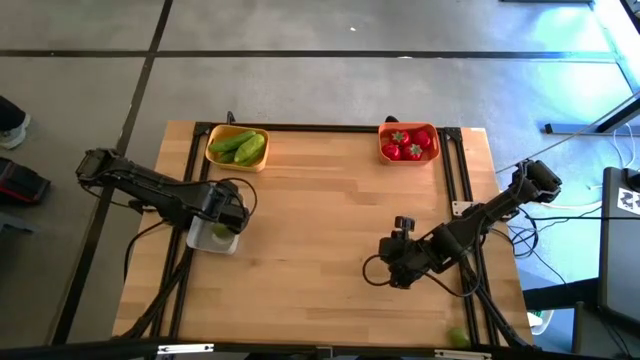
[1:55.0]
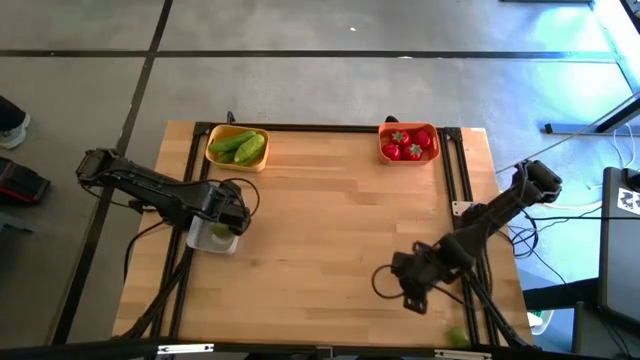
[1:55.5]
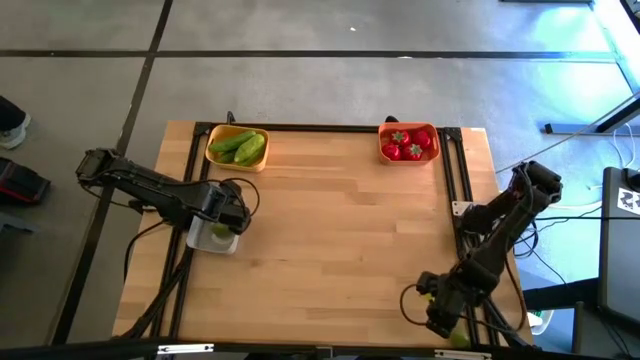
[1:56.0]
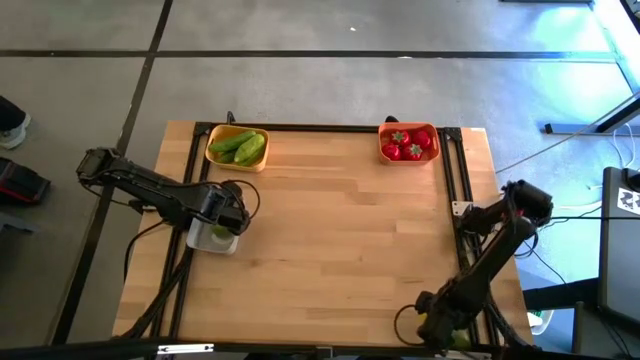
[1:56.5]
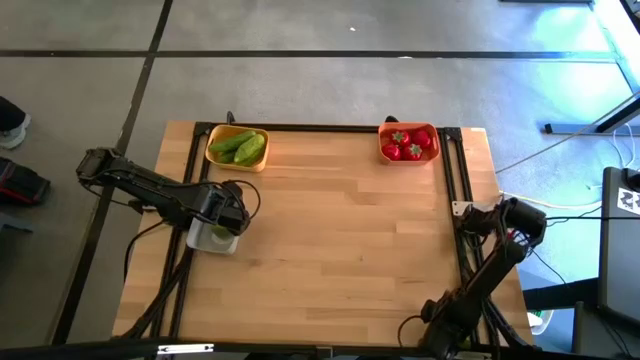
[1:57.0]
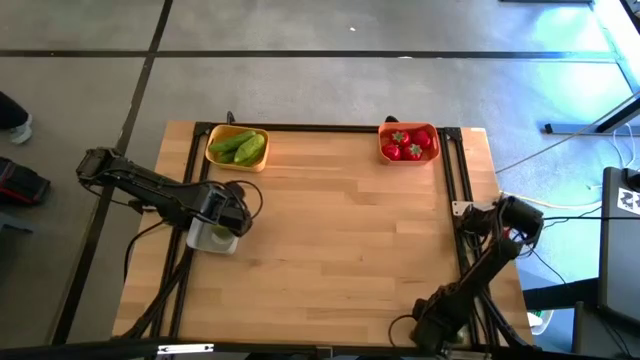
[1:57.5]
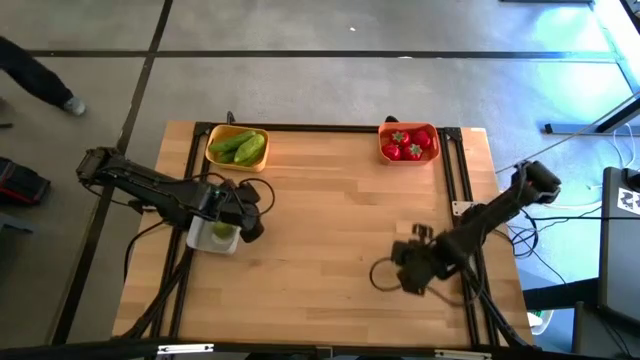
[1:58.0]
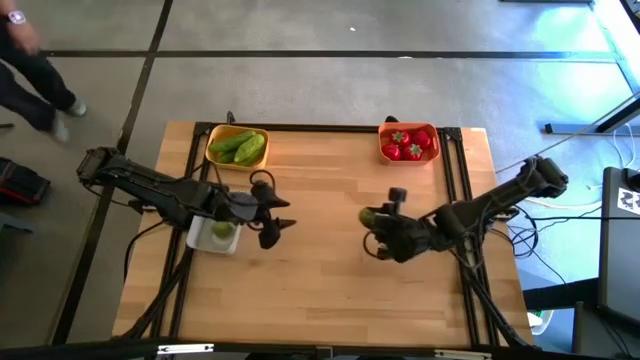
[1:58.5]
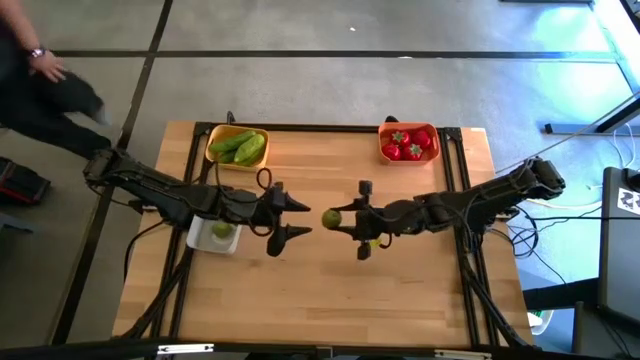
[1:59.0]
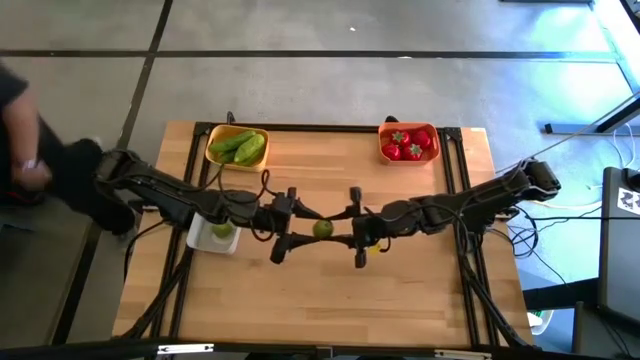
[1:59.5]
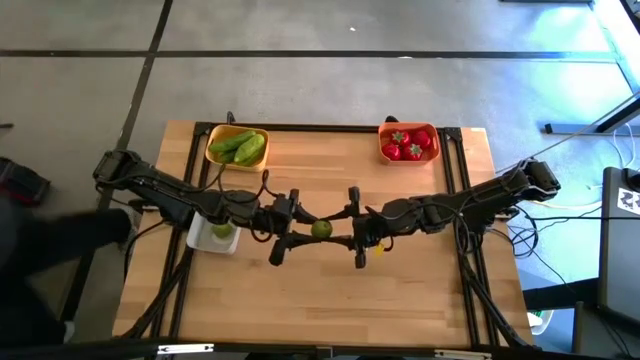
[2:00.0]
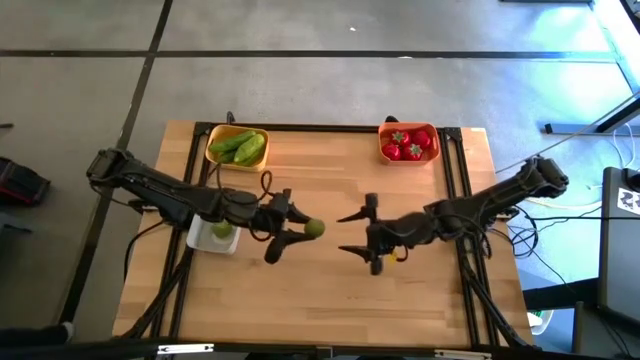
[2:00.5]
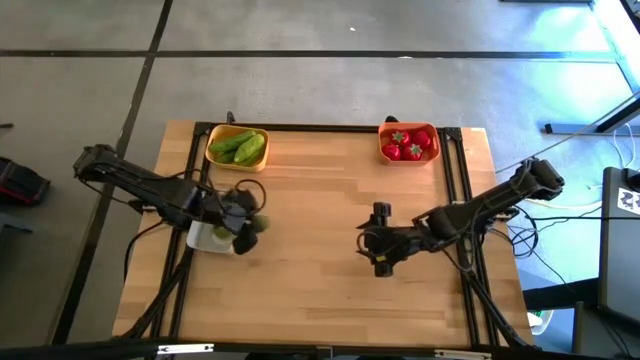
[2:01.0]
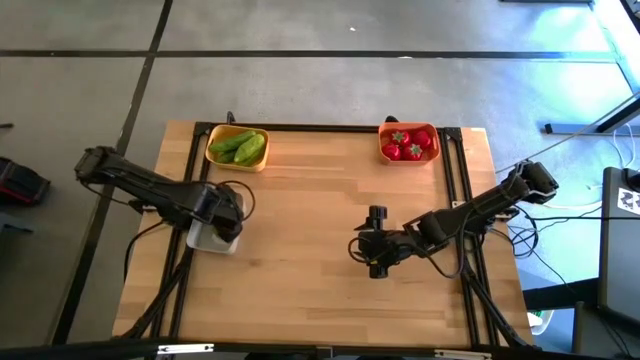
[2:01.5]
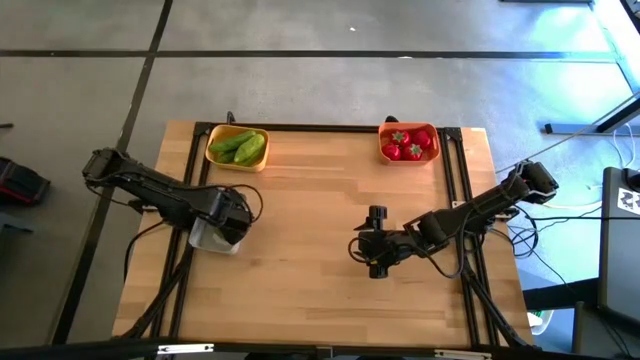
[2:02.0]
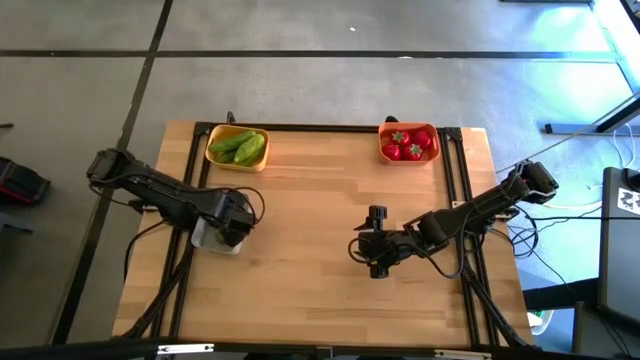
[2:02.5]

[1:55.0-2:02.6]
Task: Sort produce into baskets
Put the green lime into the white bin

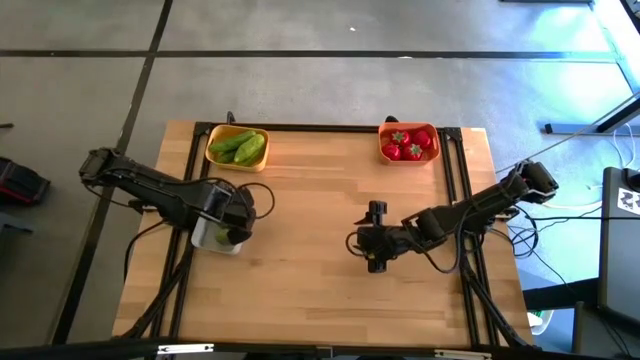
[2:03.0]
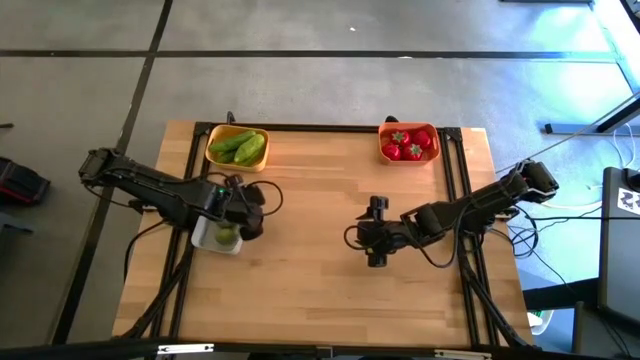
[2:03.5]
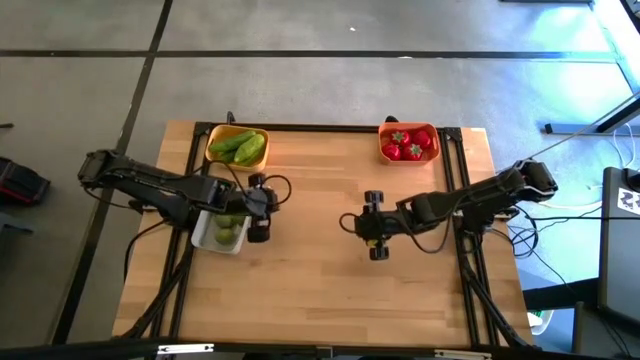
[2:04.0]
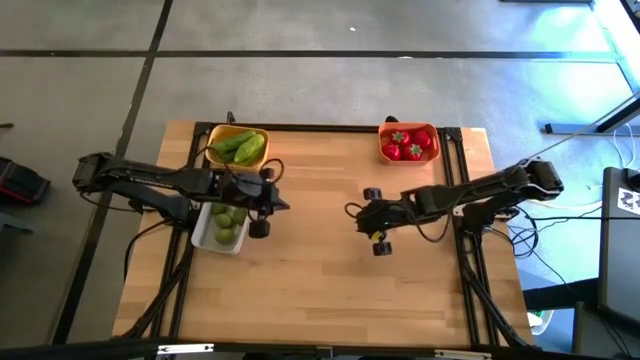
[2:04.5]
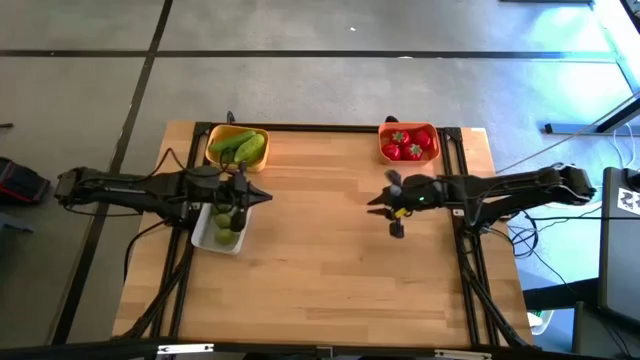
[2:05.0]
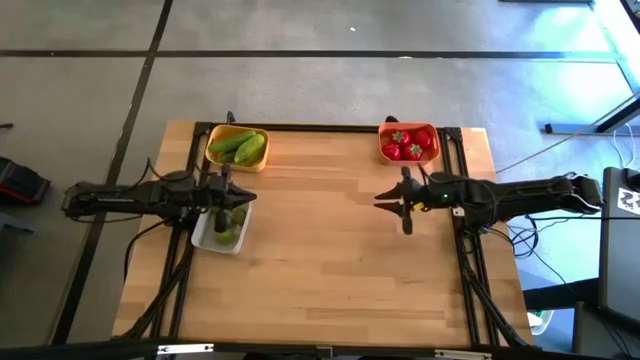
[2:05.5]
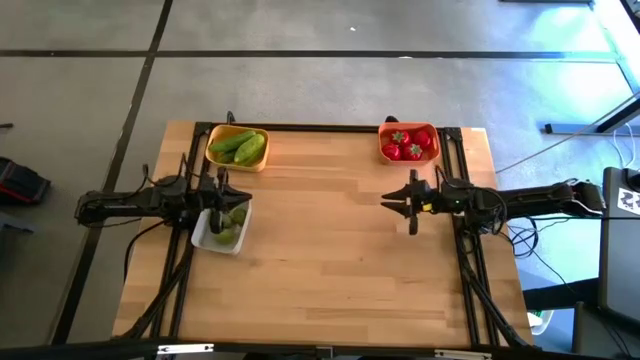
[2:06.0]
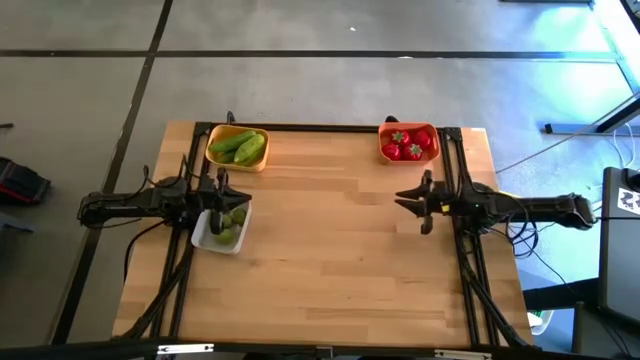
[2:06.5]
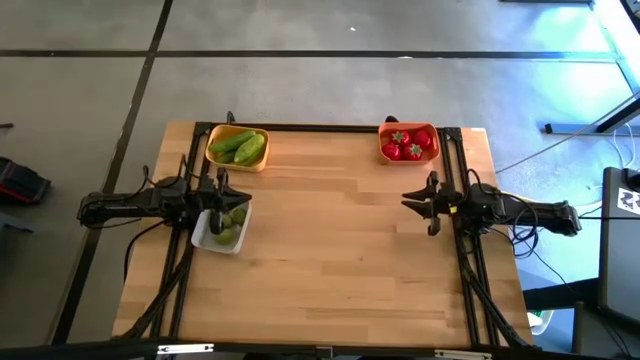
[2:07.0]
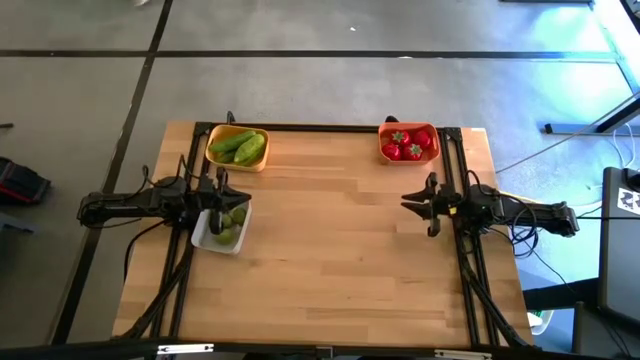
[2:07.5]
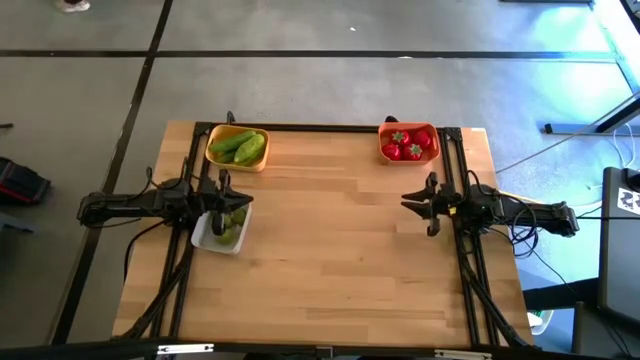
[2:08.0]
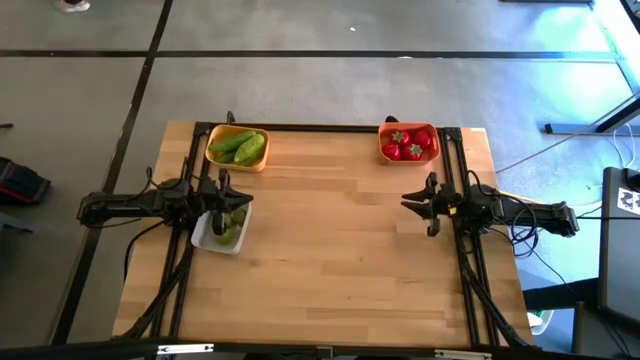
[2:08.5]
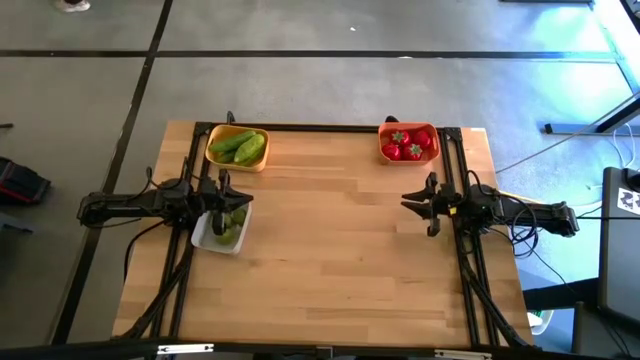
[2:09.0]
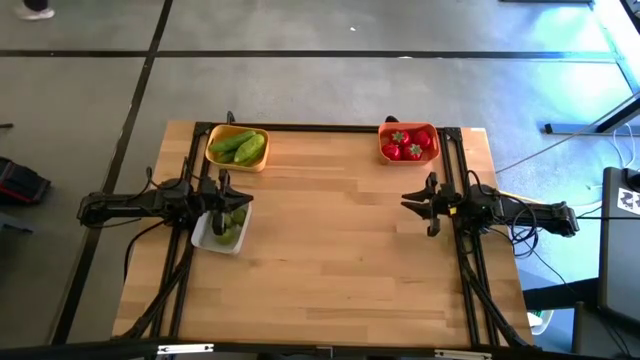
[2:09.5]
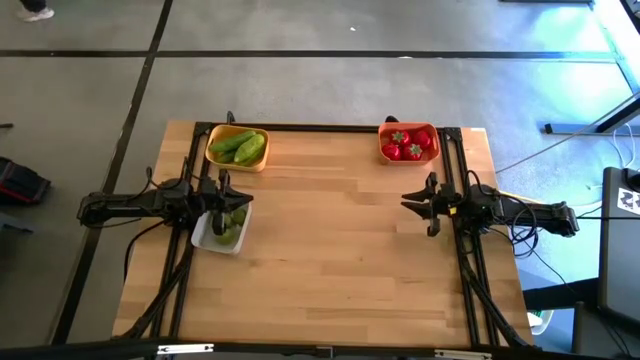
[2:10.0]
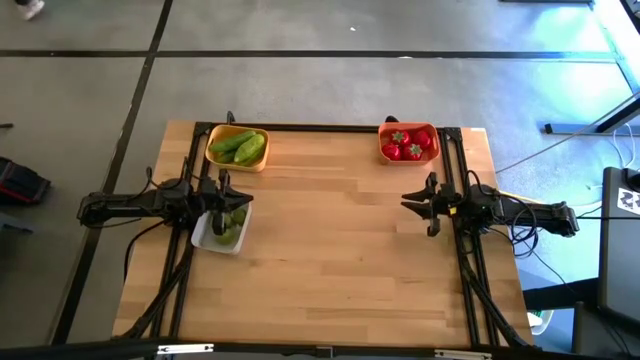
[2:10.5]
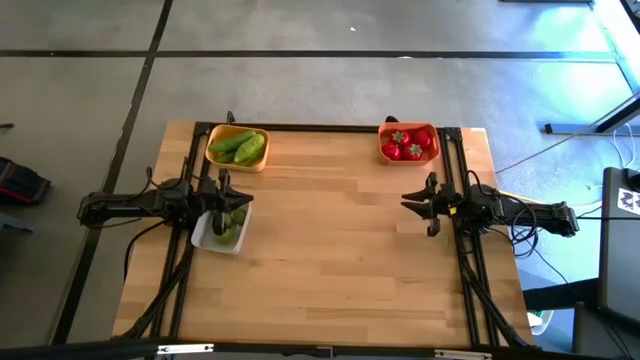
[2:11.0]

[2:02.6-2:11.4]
Return to Home Position

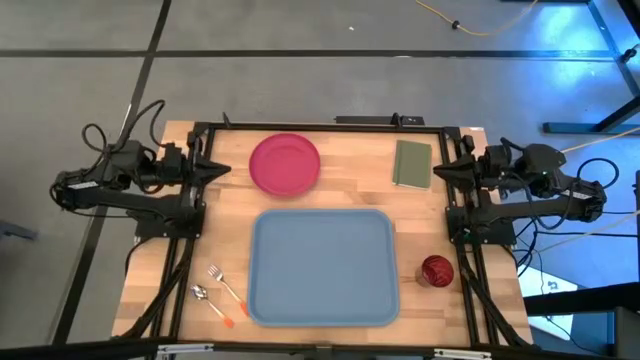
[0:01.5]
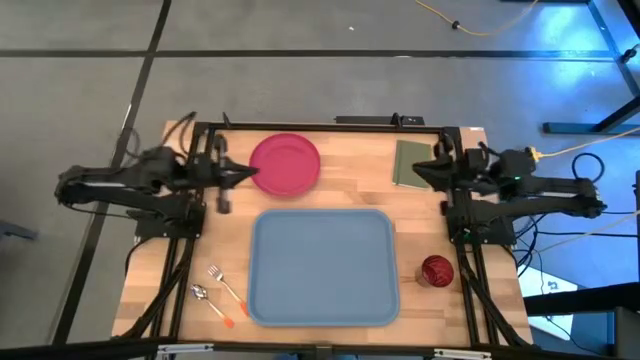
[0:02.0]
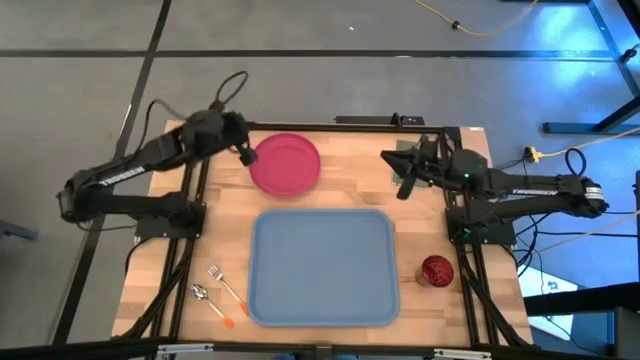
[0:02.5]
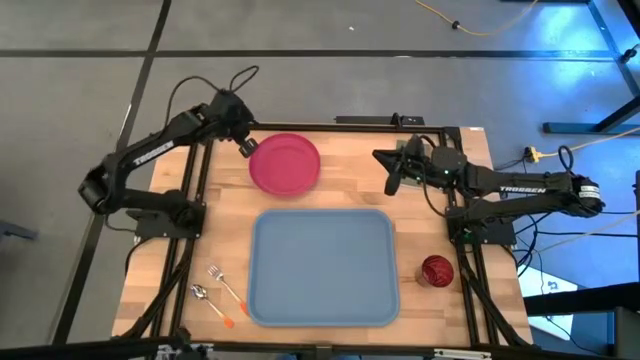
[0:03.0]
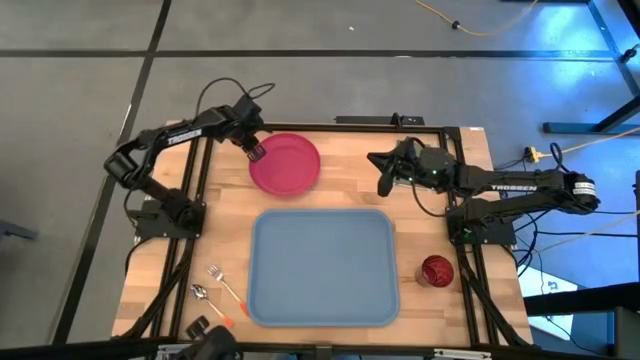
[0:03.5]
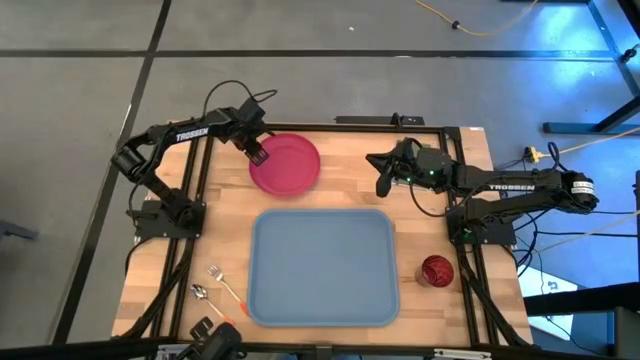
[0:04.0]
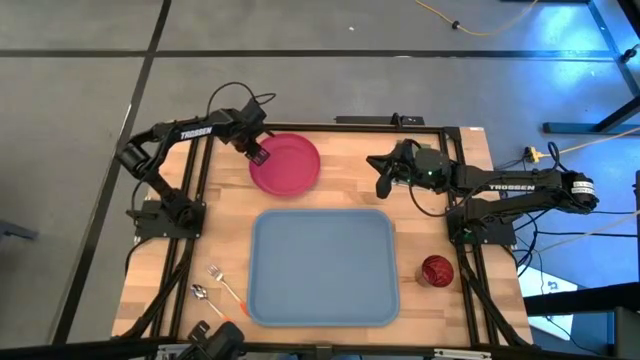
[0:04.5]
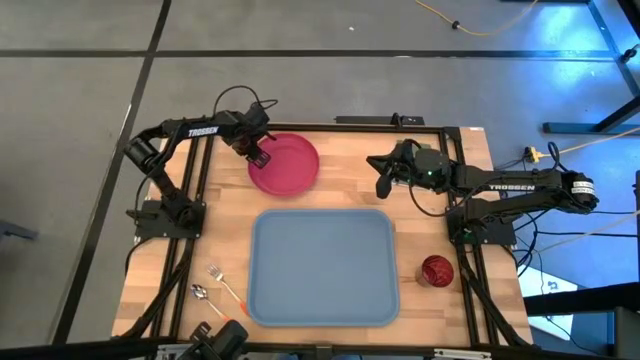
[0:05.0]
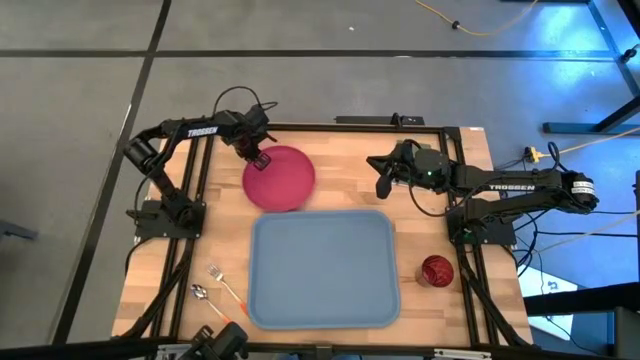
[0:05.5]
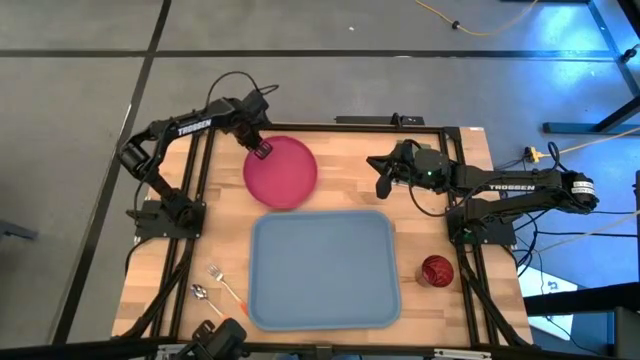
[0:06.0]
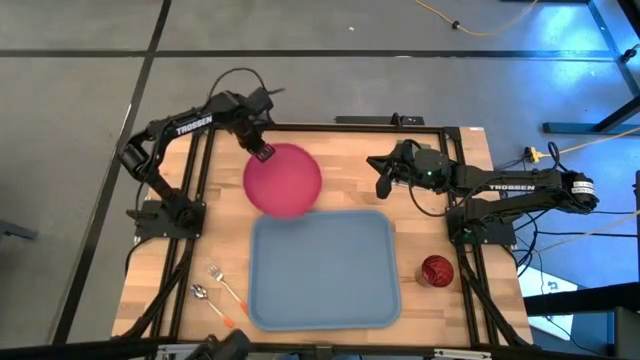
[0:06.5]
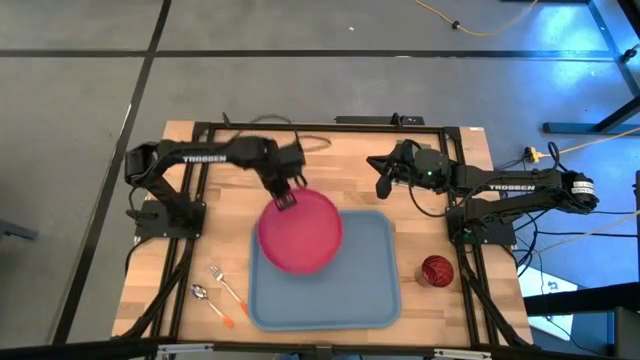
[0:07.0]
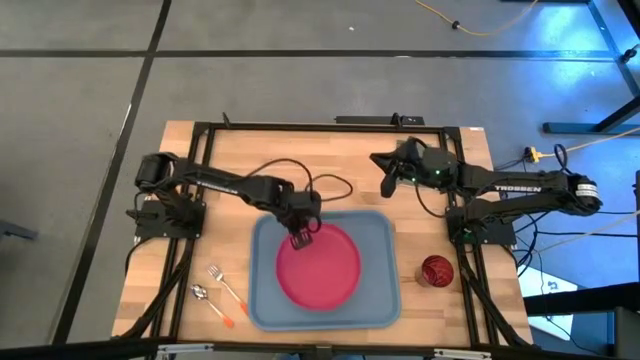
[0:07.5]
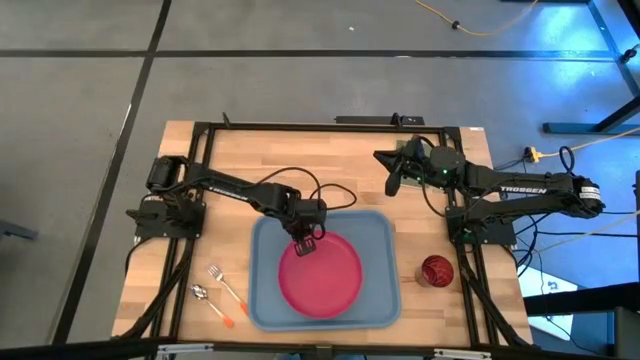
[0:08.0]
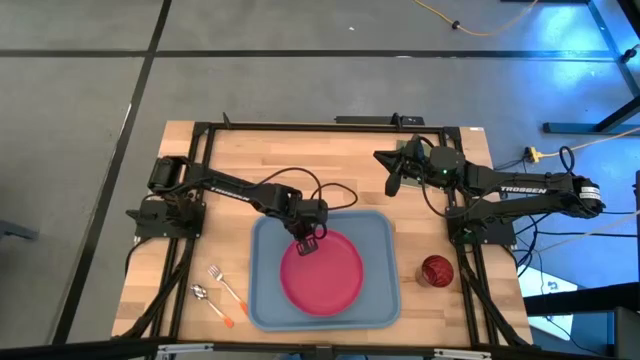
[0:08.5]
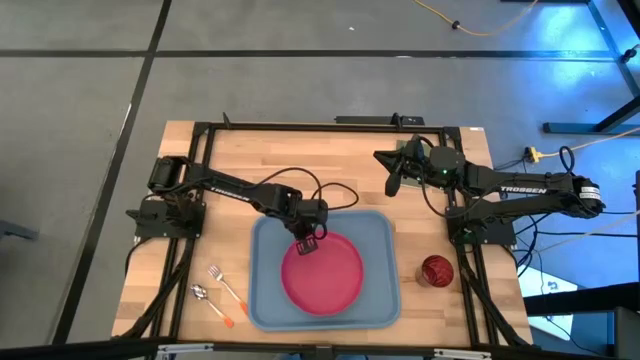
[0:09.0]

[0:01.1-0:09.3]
Task: Pick and place plate/cup/fork/spoon on tray
Put the pink plate on the center of the blue serving tray
